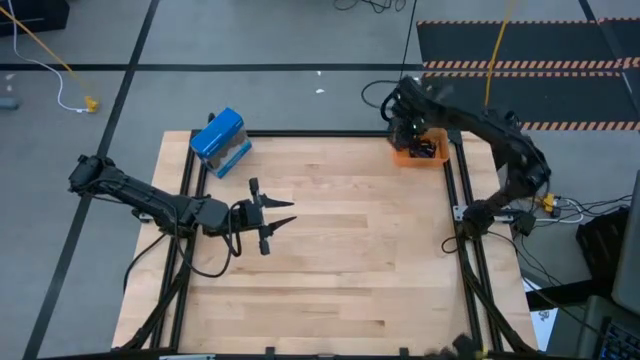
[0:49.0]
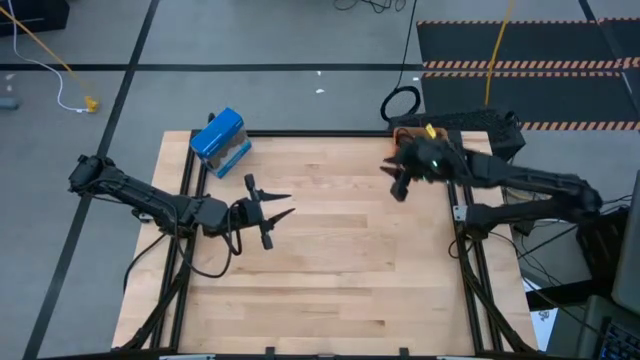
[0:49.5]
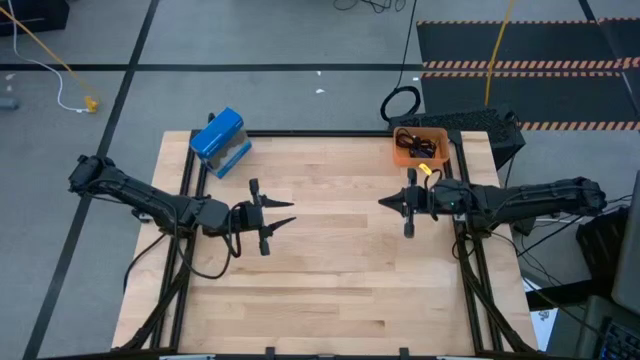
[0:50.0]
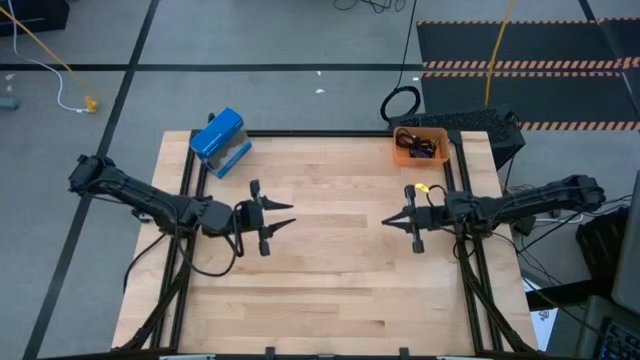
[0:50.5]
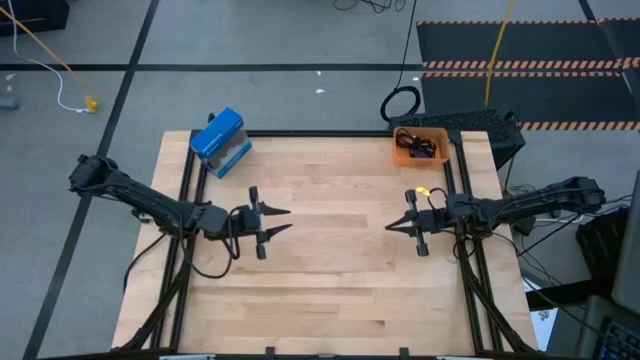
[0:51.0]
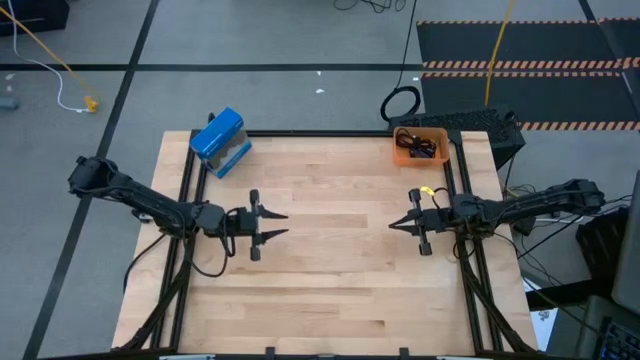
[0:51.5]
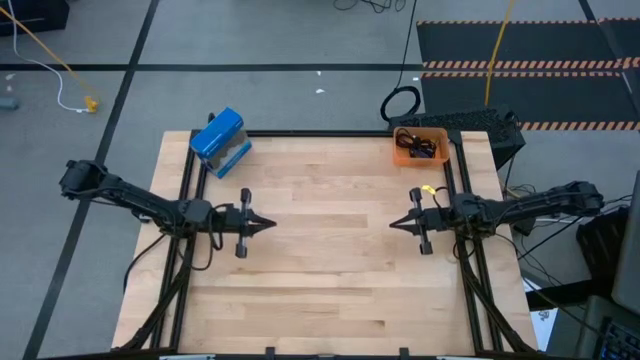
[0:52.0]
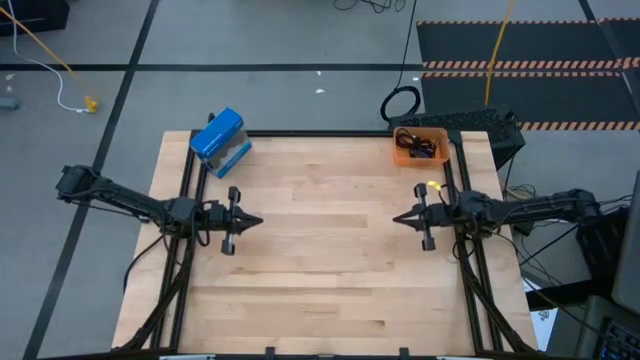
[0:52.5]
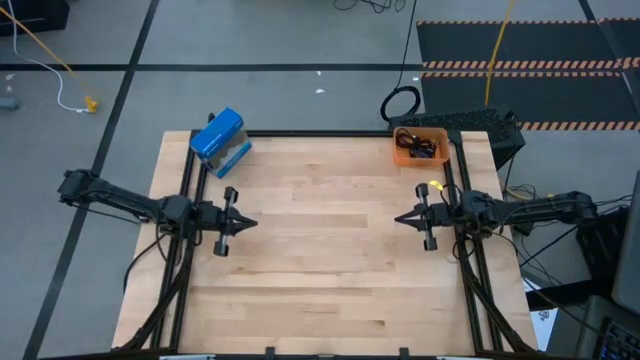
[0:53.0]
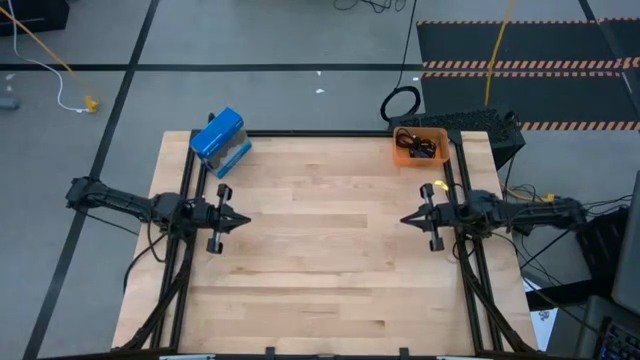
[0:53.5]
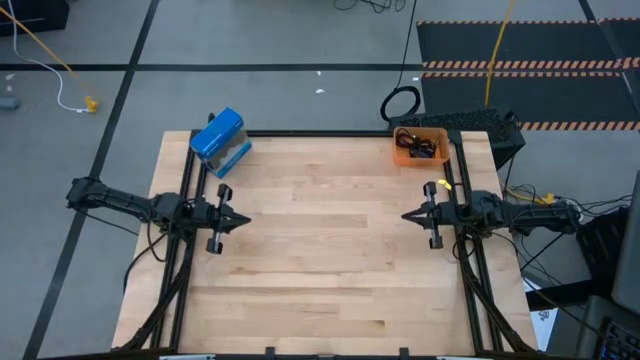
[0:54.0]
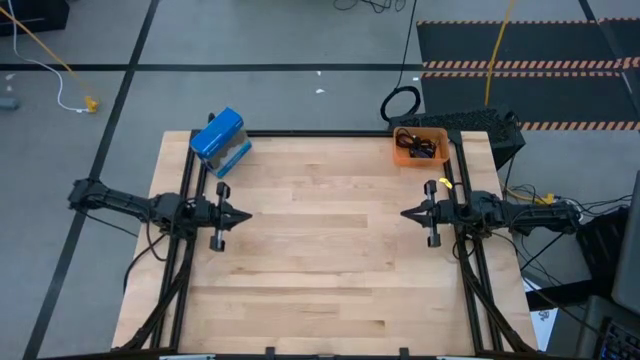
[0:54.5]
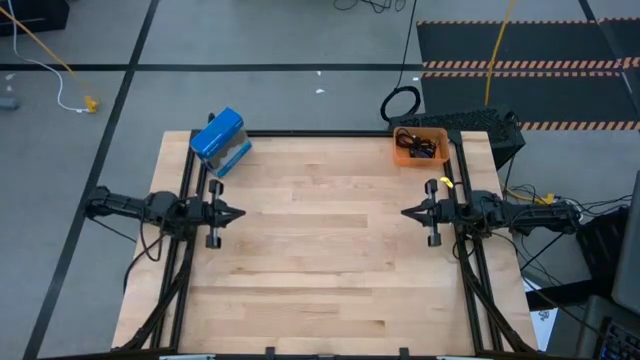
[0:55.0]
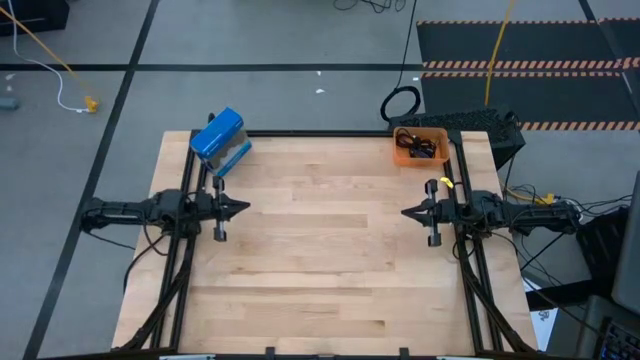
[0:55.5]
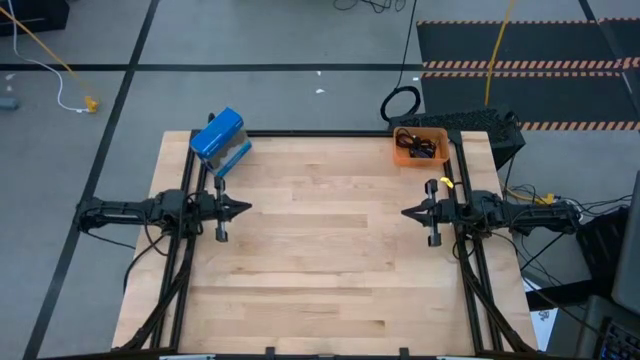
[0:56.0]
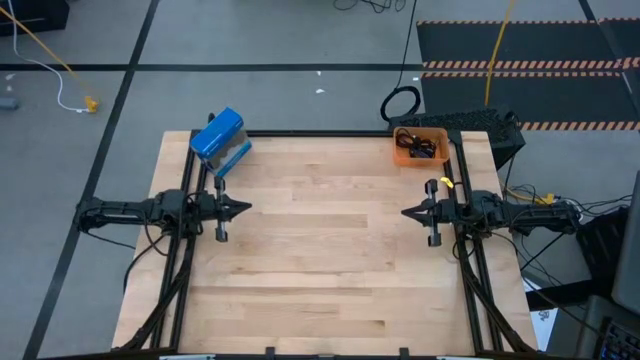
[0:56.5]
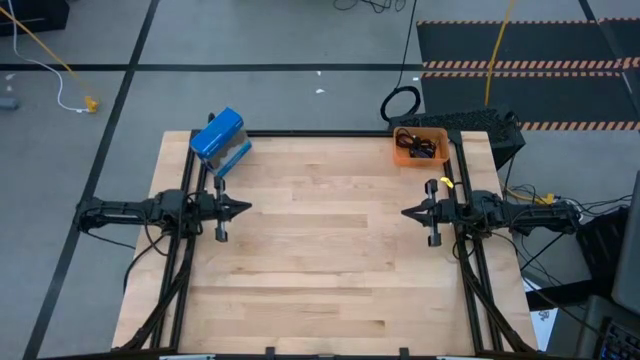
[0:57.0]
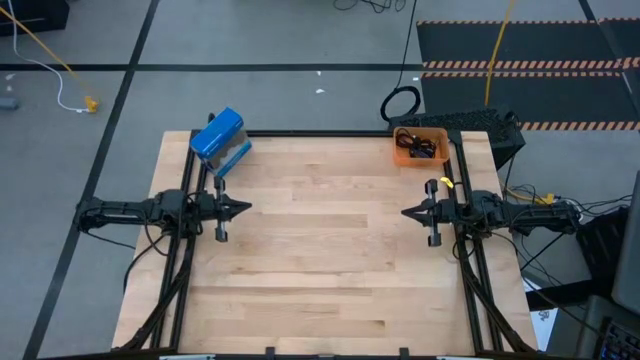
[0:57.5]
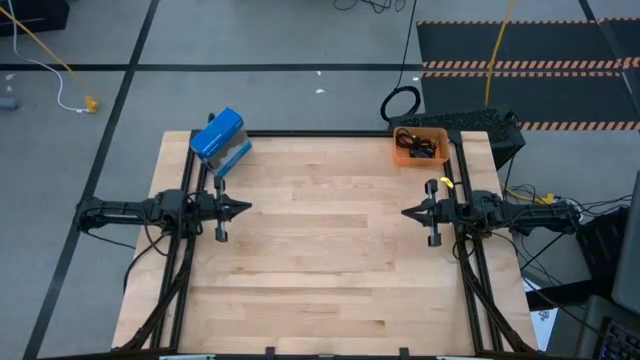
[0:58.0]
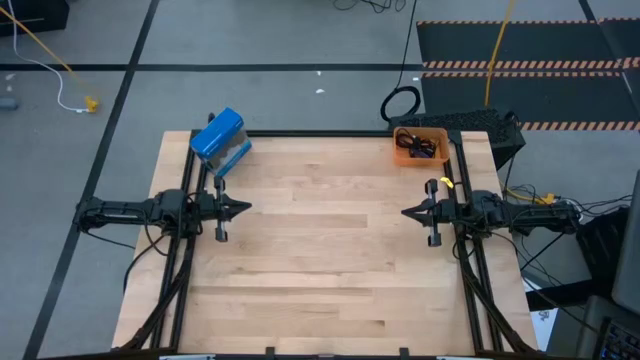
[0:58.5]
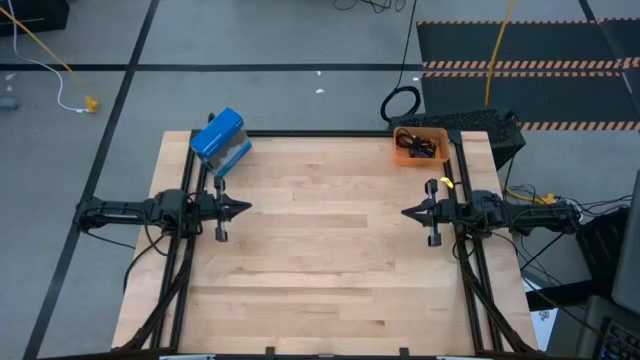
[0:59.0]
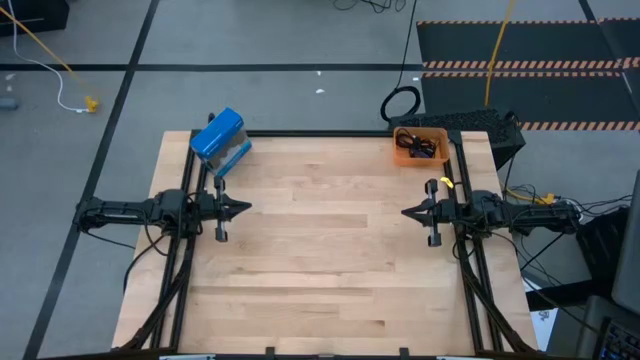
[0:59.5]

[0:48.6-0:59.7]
Task: Pick and place USB-C Cables
Return to Home Position

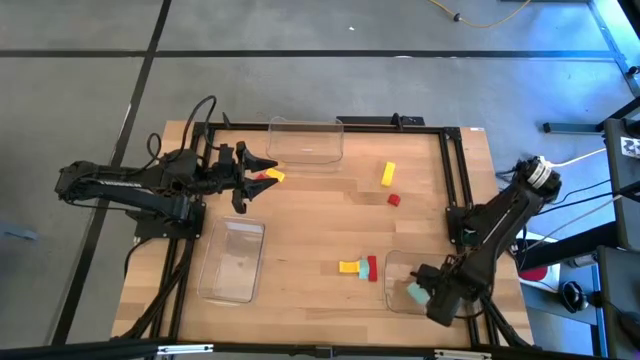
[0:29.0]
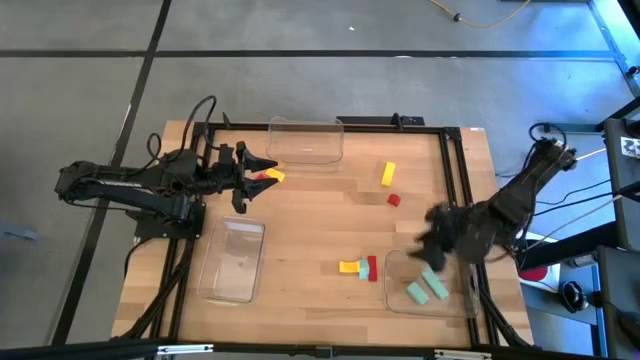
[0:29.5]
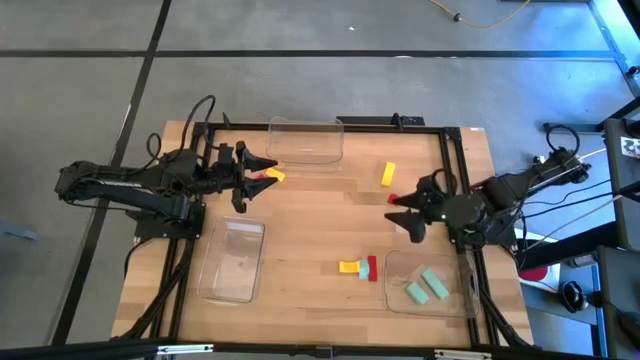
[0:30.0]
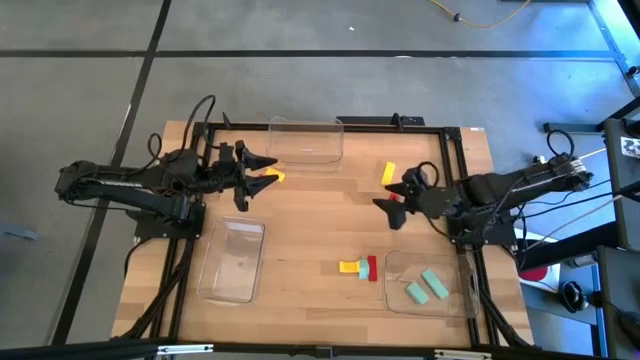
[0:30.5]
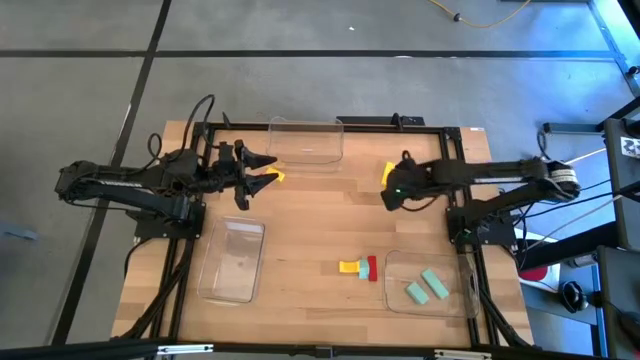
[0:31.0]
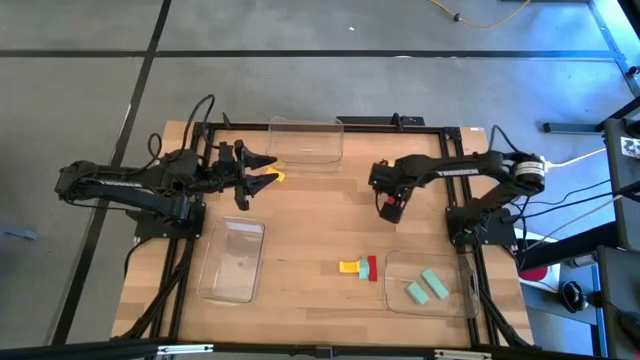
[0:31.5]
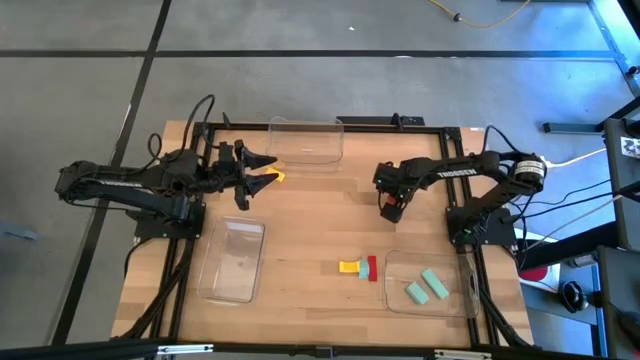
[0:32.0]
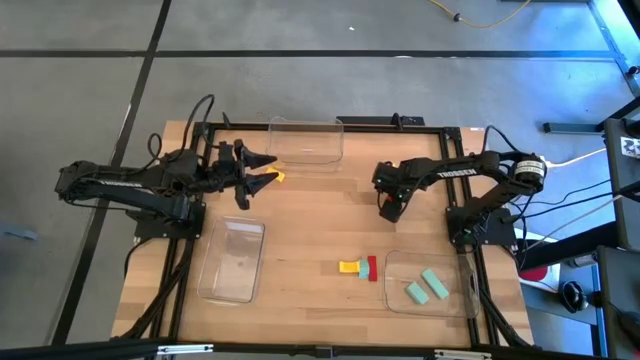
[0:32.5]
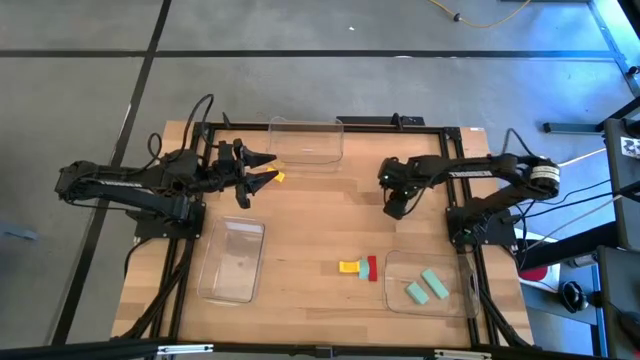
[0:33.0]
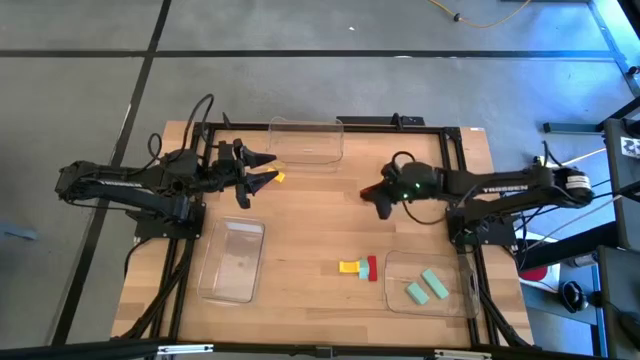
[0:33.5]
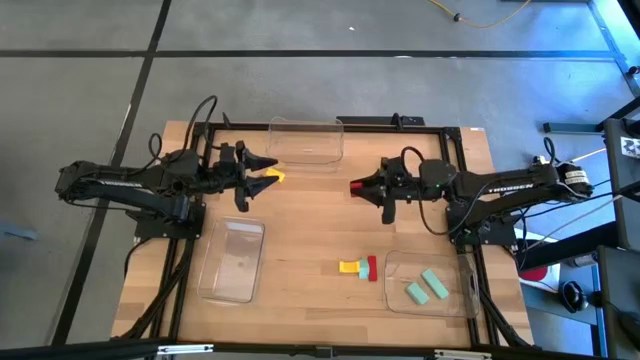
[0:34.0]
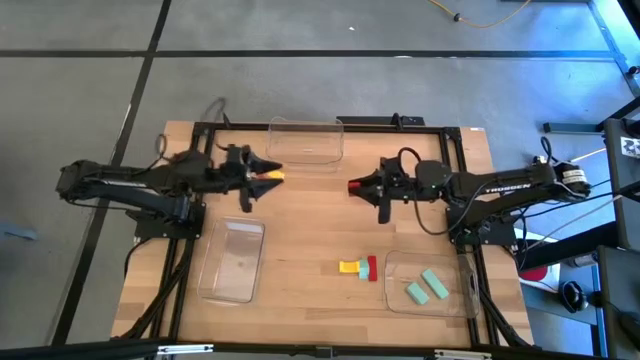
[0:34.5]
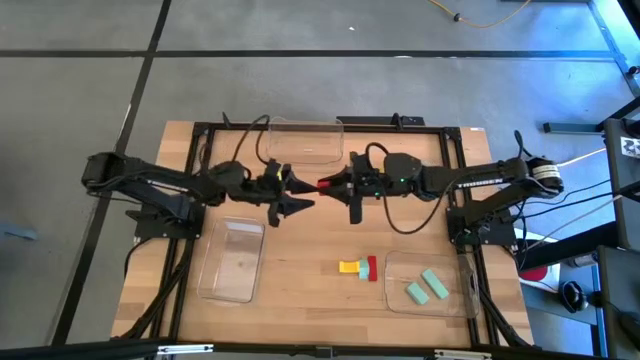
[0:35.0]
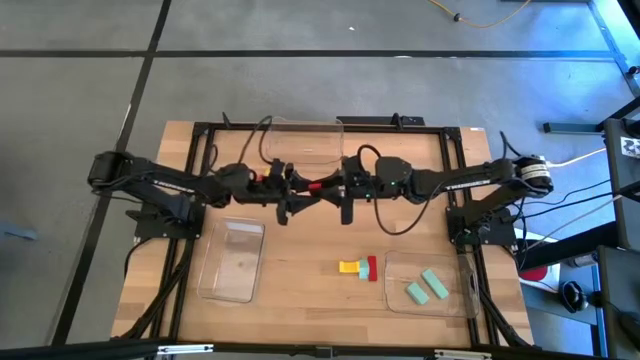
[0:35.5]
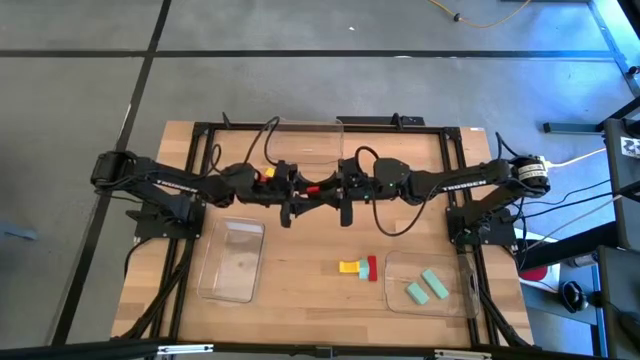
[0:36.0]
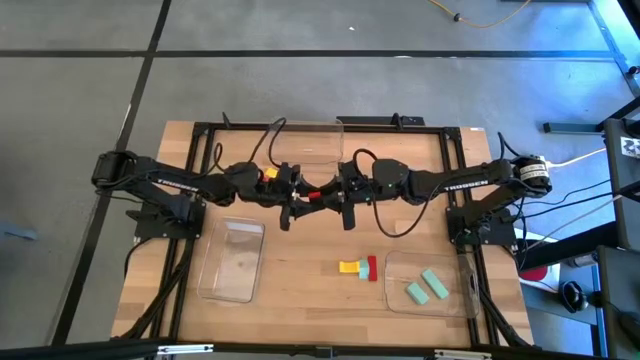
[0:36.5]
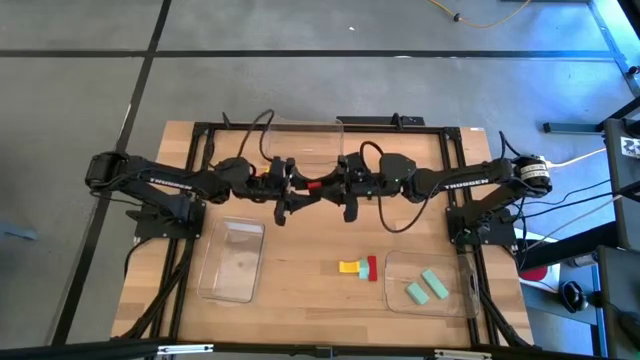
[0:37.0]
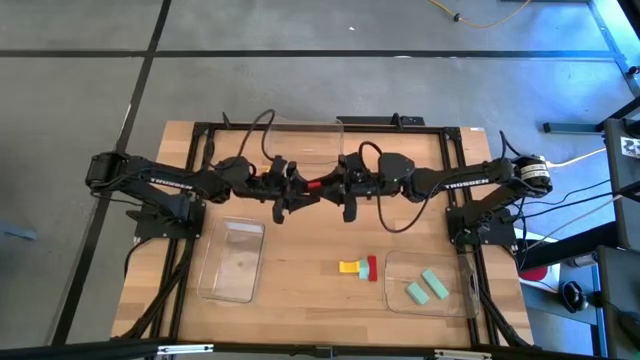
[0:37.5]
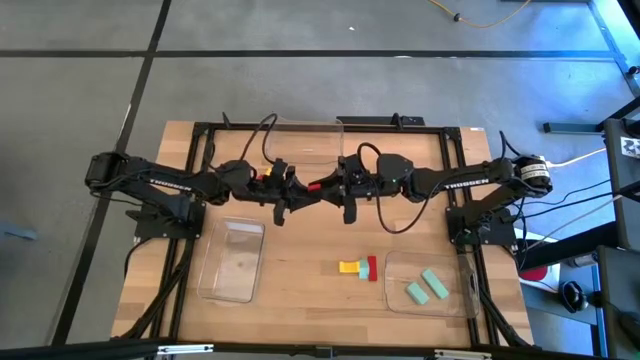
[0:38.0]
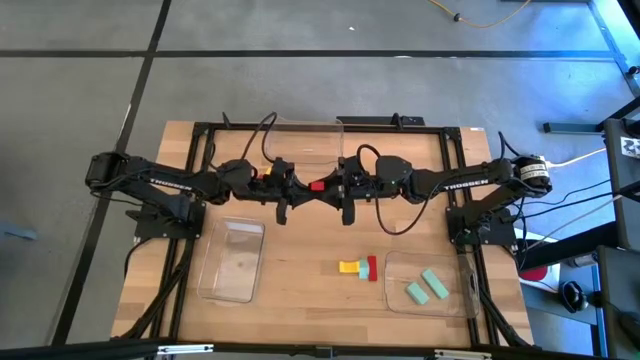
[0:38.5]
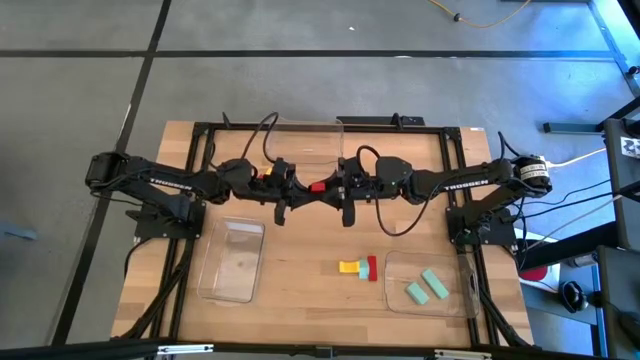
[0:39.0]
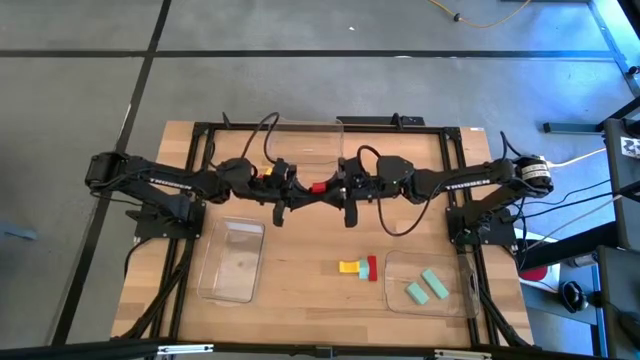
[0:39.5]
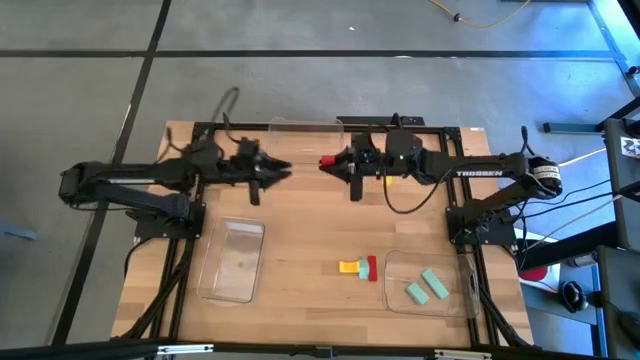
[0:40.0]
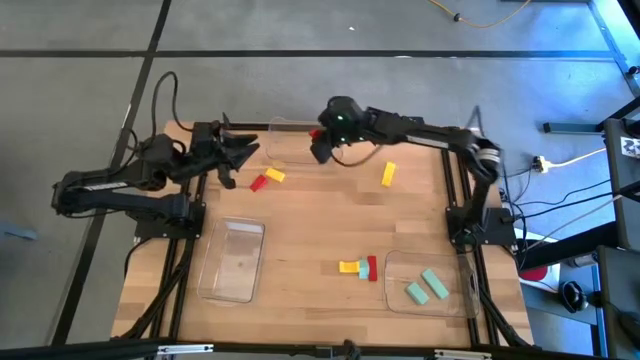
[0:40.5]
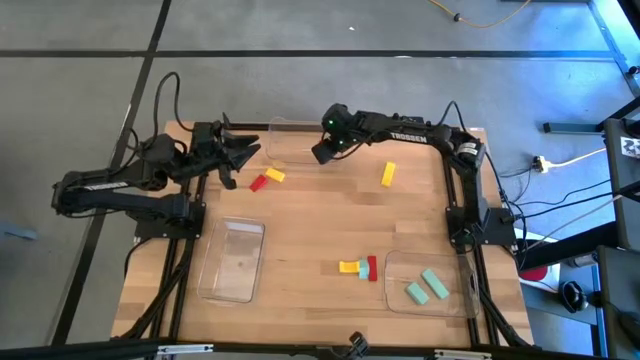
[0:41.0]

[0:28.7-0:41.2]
Task: Sort & place blocks by color
Put the top right red block on the top transparent bin
